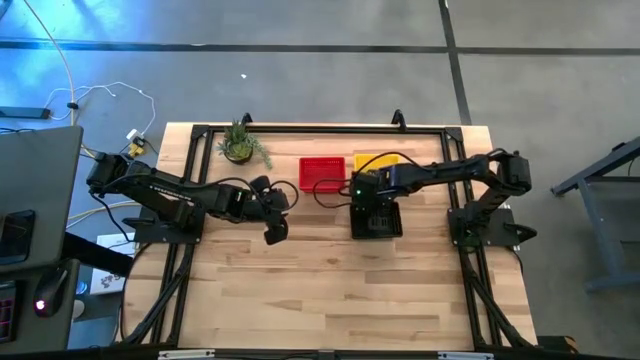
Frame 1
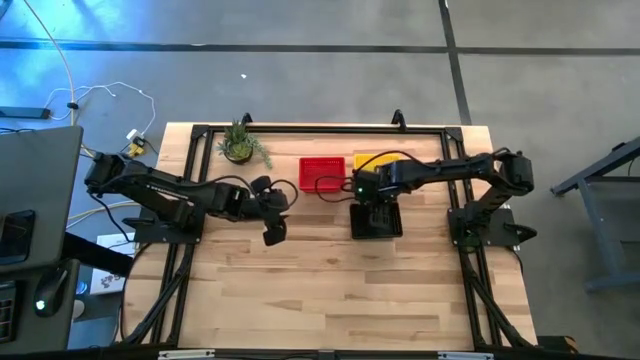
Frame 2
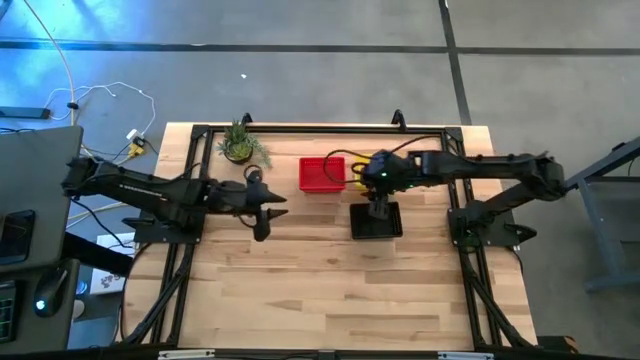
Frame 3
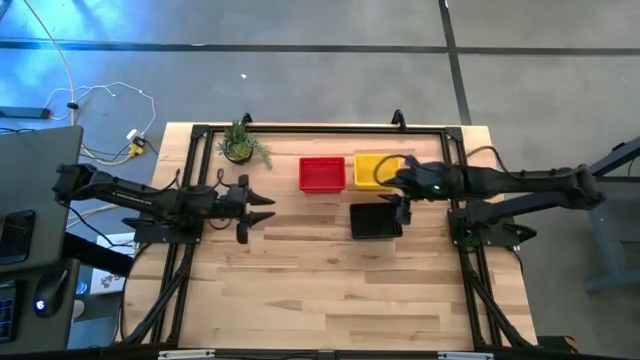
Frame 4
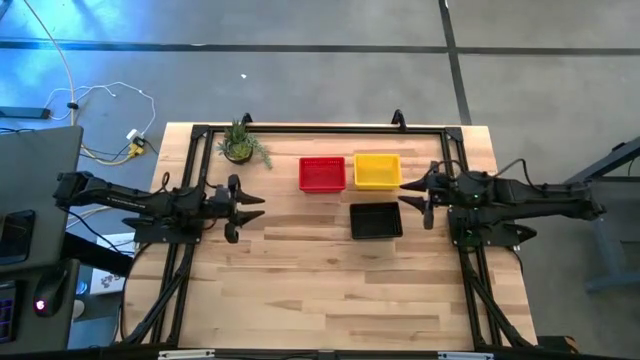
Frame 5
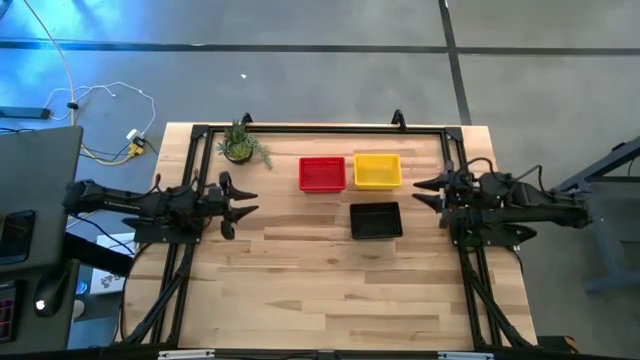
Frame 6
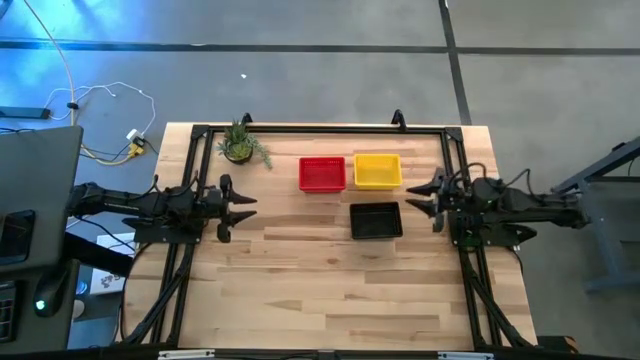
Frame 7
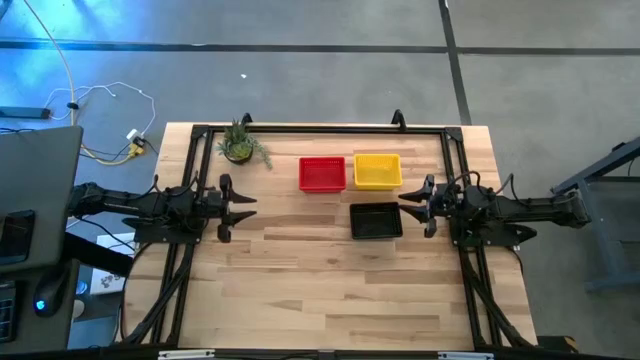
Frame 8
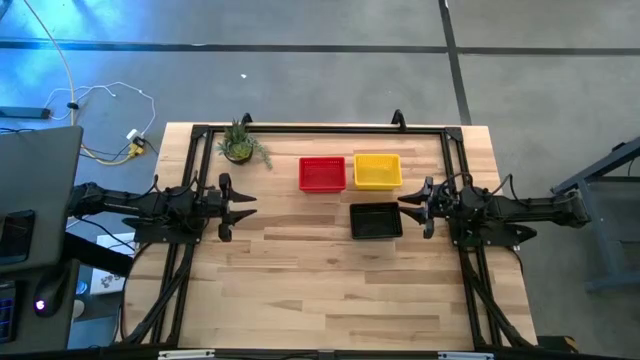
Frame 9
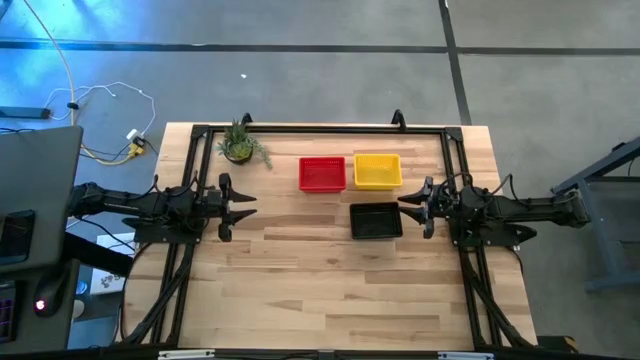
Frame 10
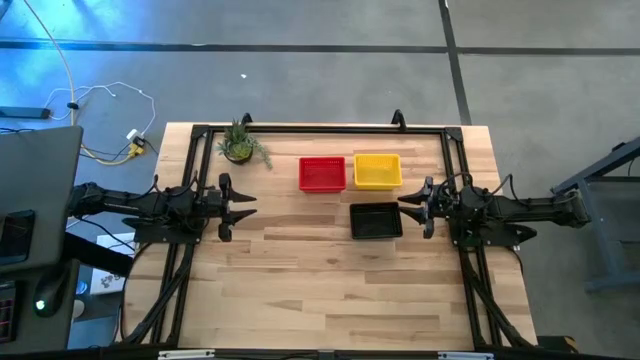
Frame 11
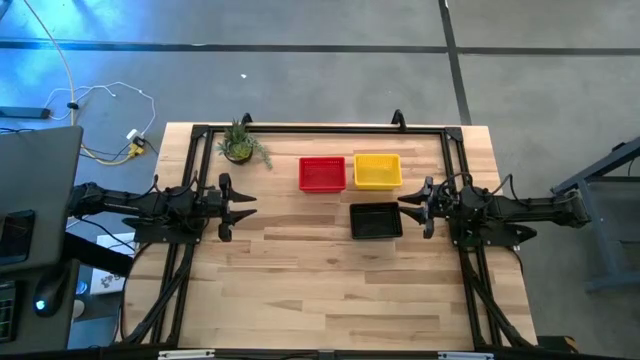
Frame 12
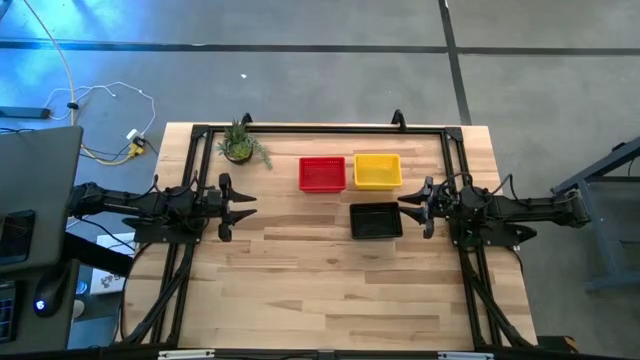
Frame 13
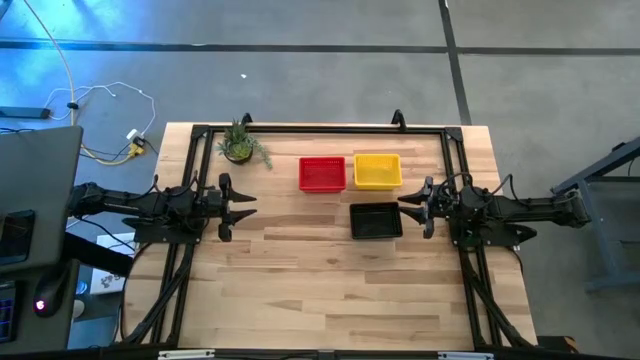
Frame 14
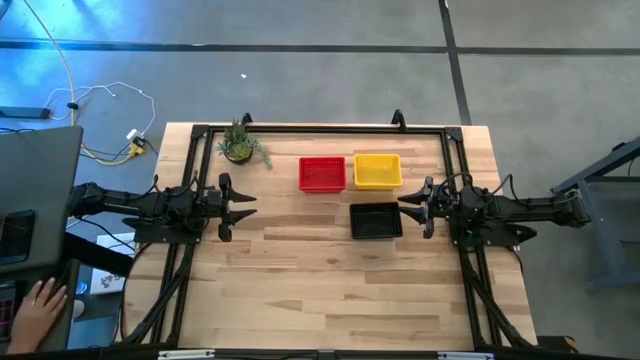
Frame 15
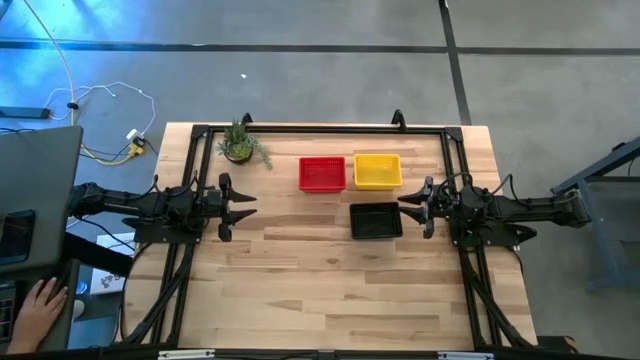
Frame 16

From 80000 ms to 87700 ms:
Return to Home Position
